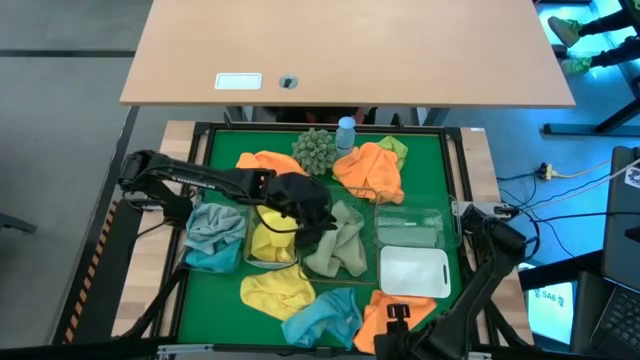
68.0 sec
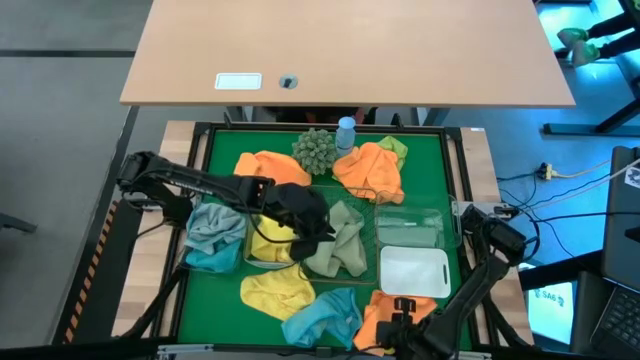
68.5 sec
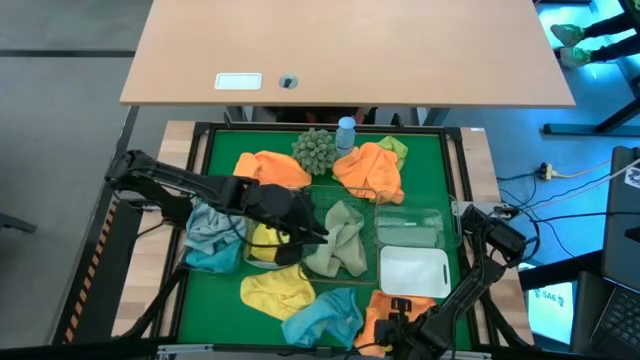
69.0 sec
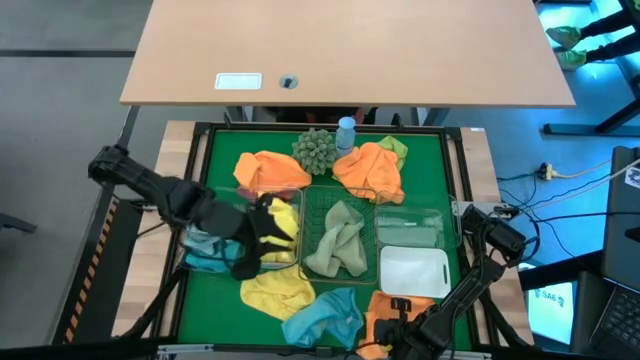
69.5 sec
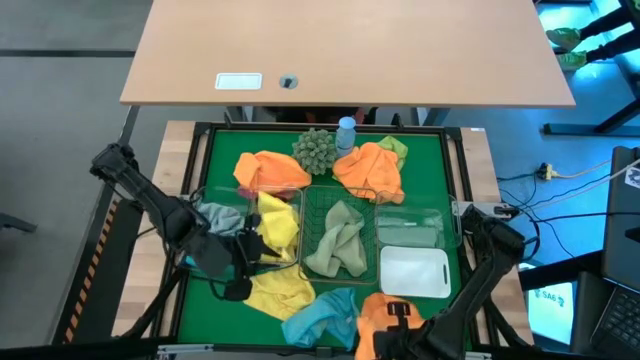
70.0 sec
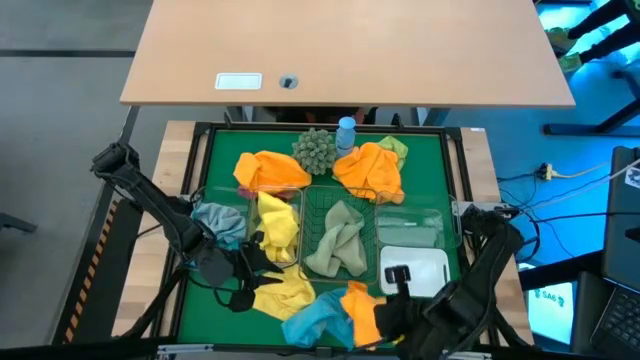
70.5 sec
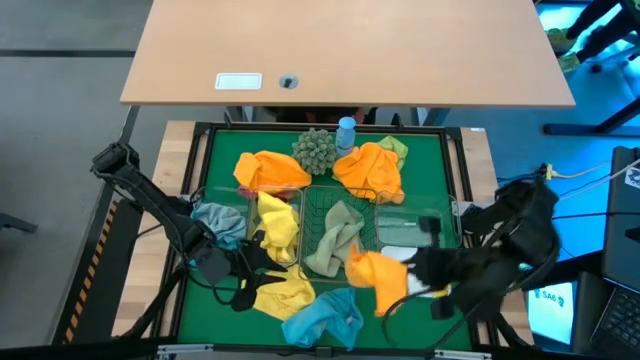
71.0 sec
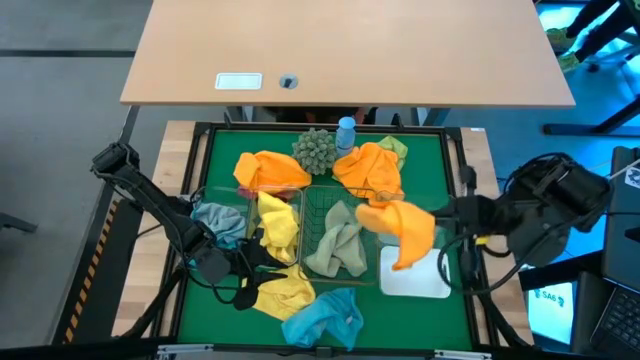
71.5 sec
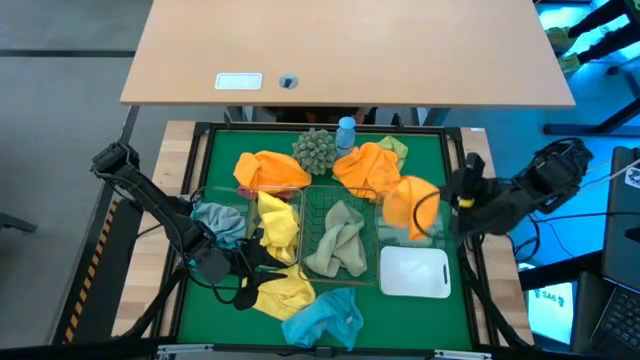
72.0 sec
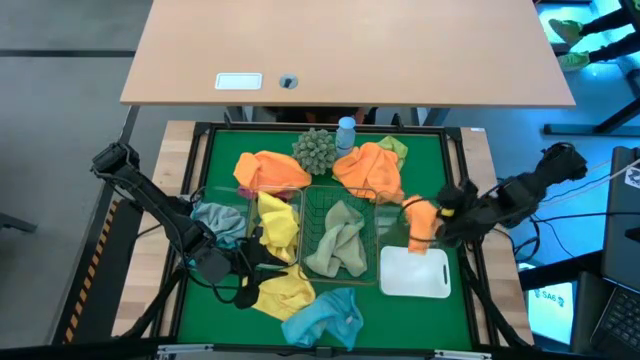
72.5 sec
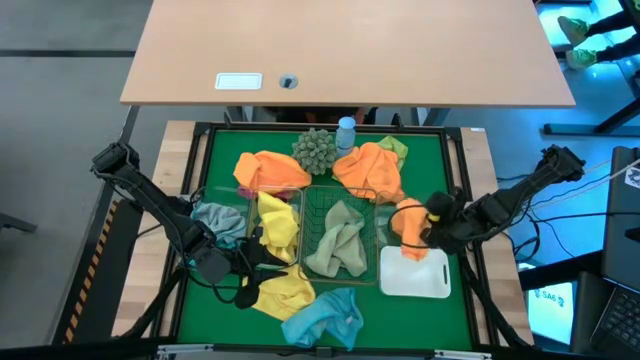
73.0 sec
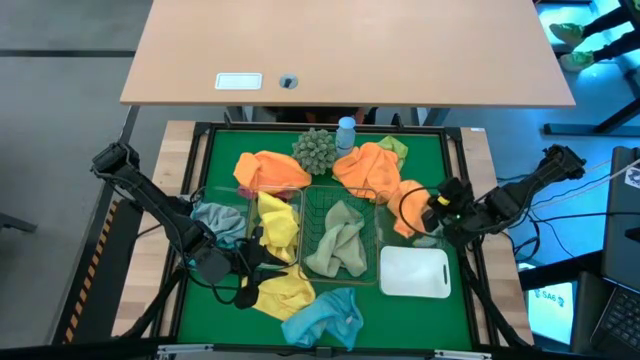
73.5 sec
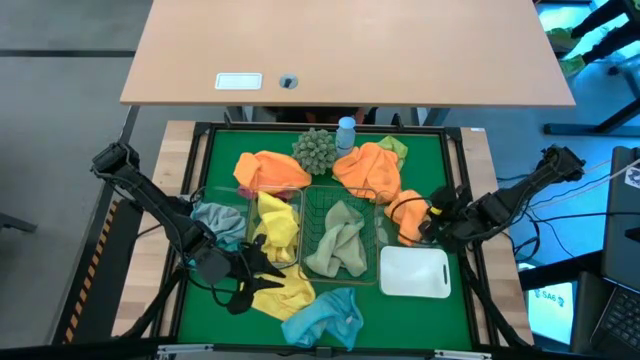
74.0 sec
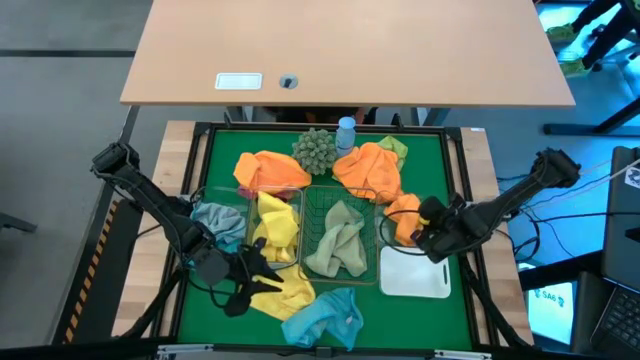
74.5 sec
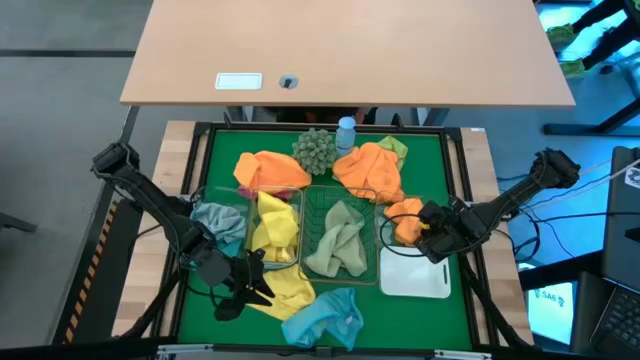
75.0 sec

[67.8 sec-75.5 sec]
Task: Sort microfiber towel by color & place in baskets
Put the bottom right orange microfiber cloth into the right transparent bin

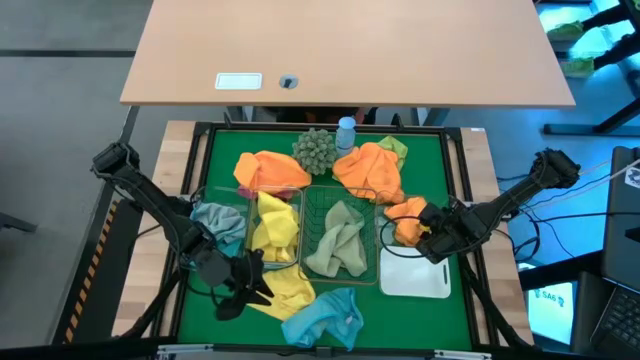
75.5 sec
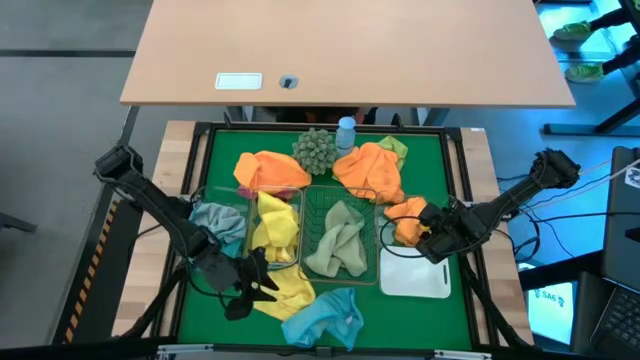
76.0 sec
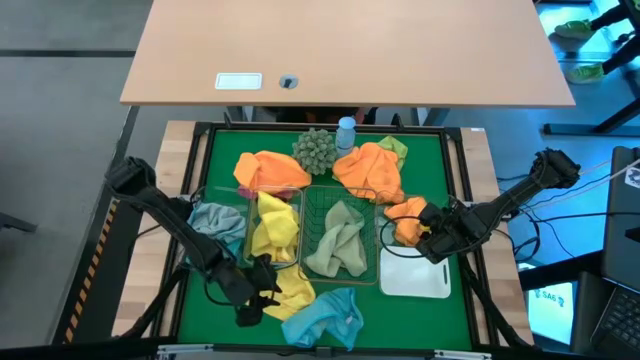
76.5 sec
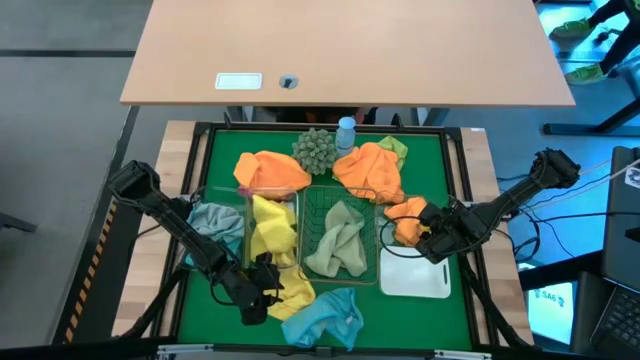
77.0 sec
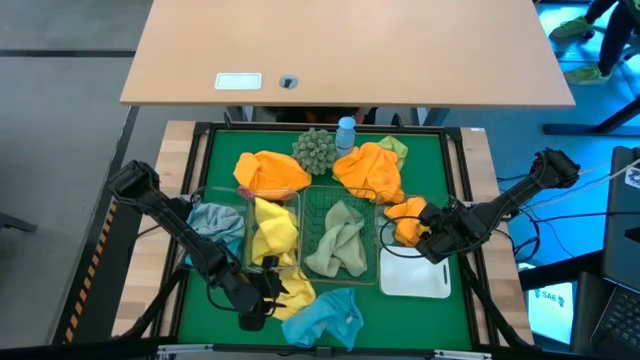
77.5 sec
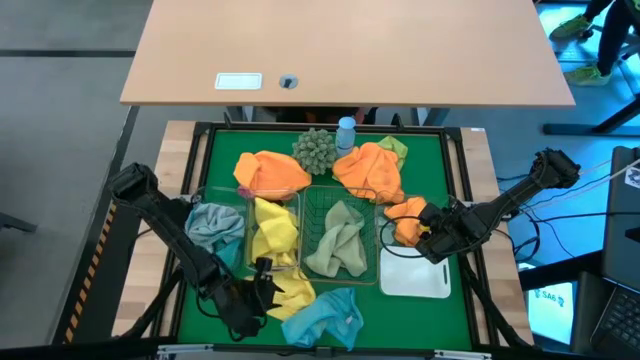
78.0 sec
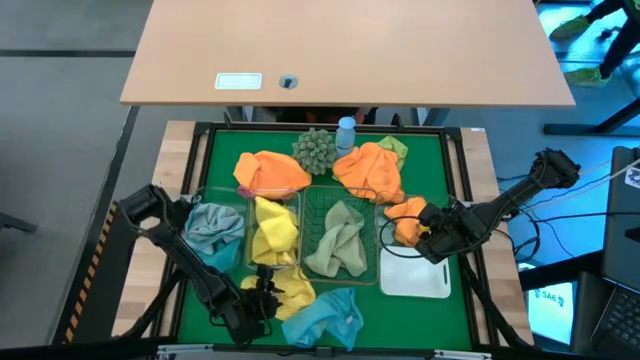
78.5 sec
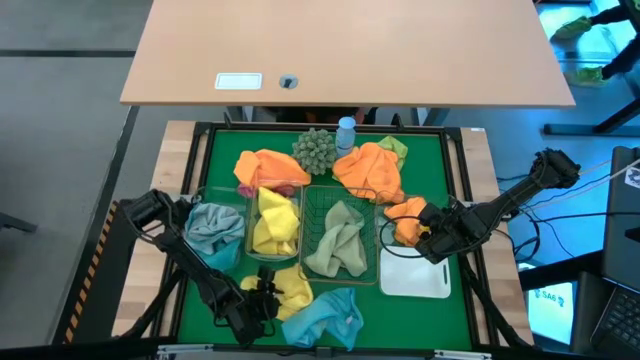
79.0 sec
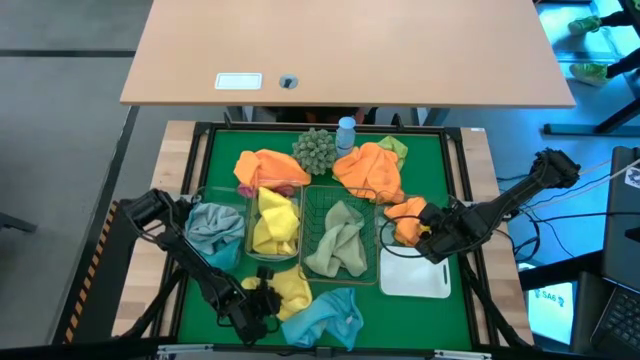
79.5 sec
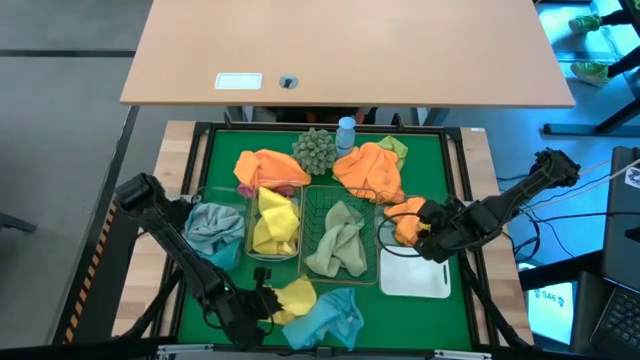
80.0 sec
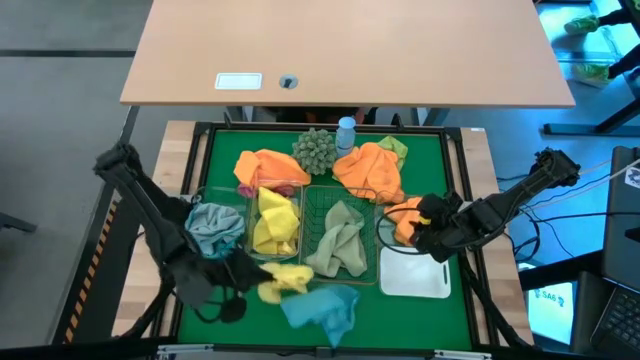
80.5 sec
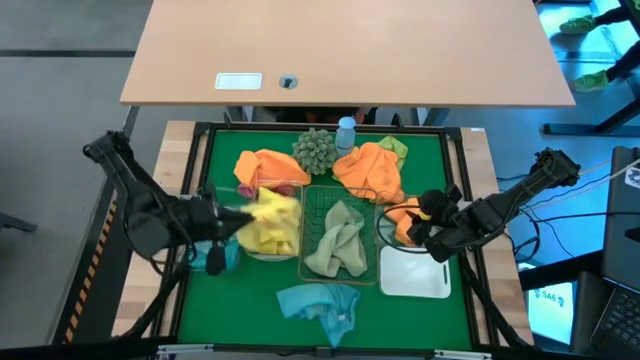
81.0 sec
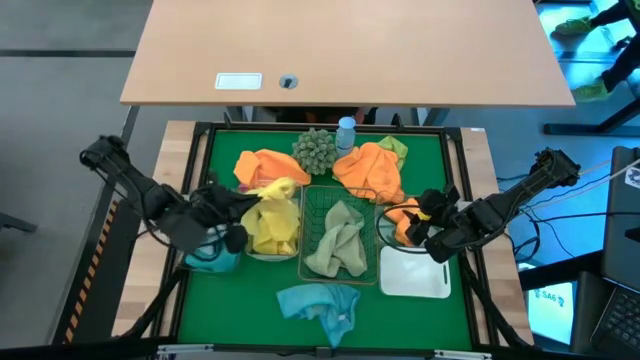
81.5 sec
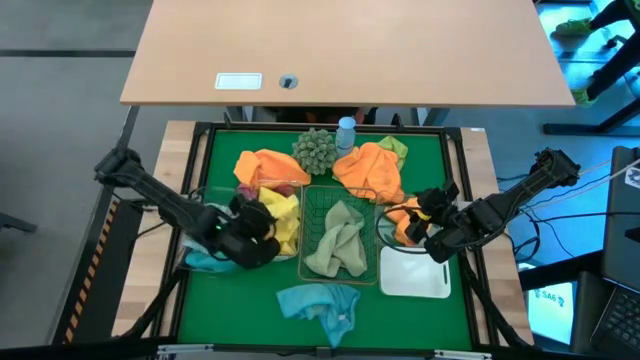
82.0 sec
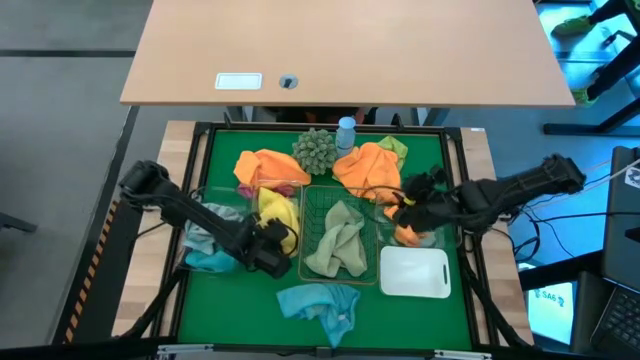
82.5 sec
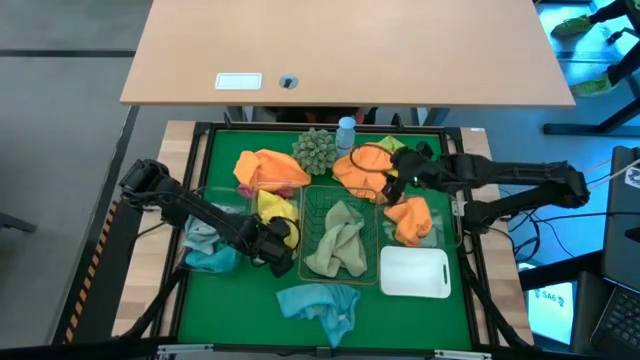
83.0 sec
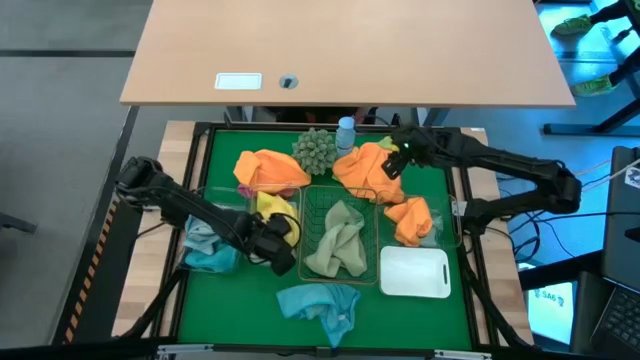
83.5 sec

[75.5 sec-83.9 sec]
Put the yellow microfiber cloth into the middle transparent bin

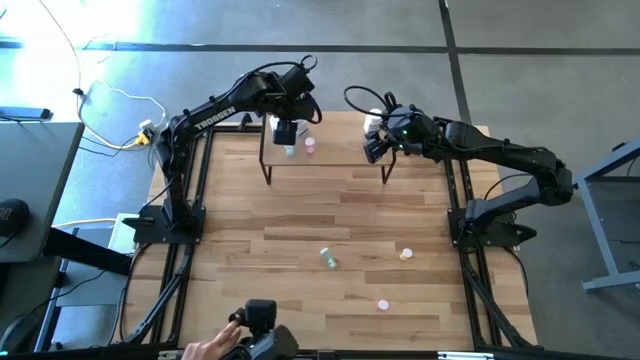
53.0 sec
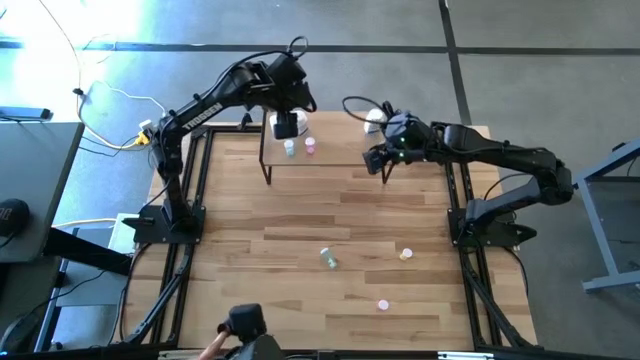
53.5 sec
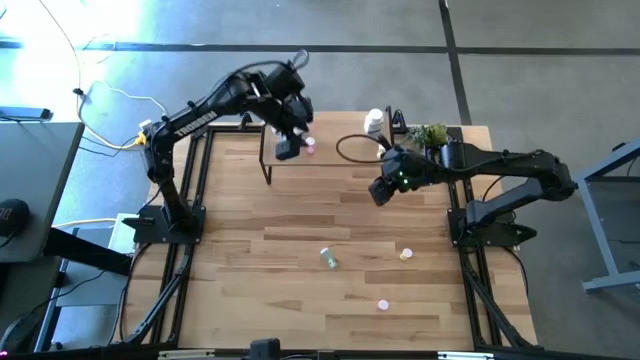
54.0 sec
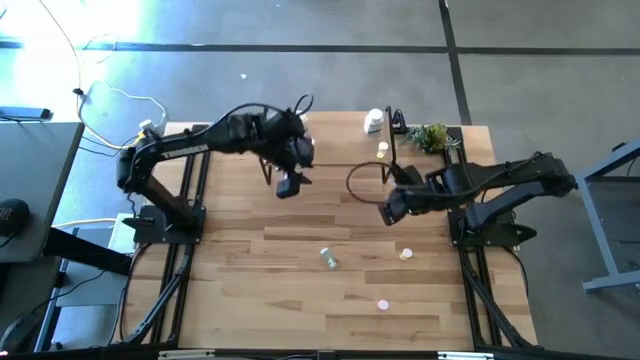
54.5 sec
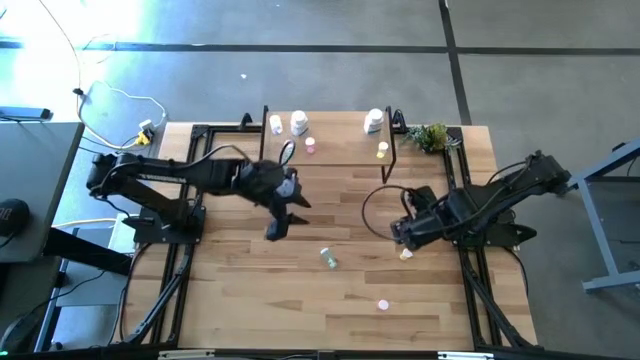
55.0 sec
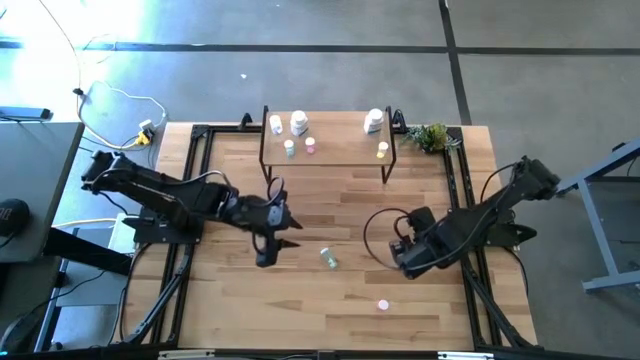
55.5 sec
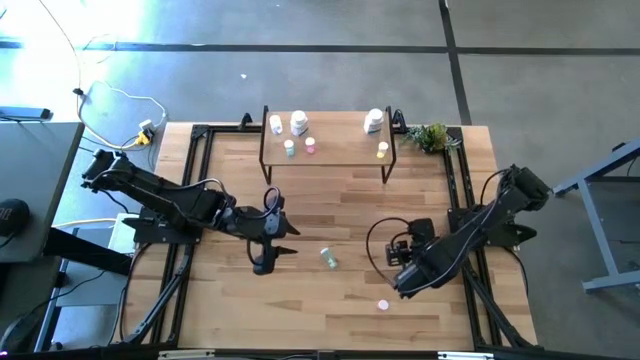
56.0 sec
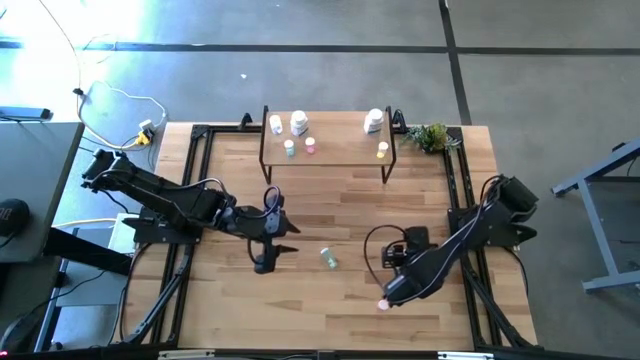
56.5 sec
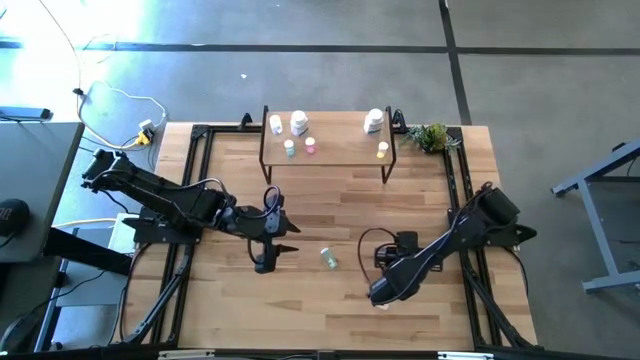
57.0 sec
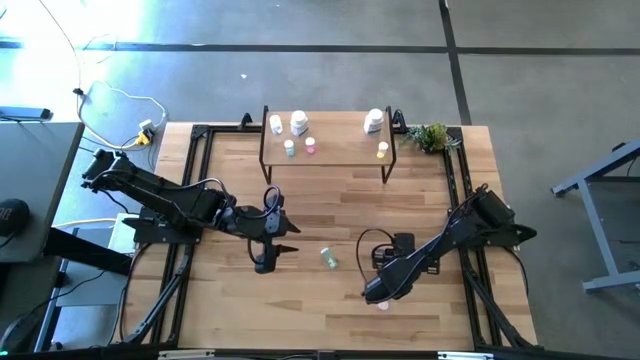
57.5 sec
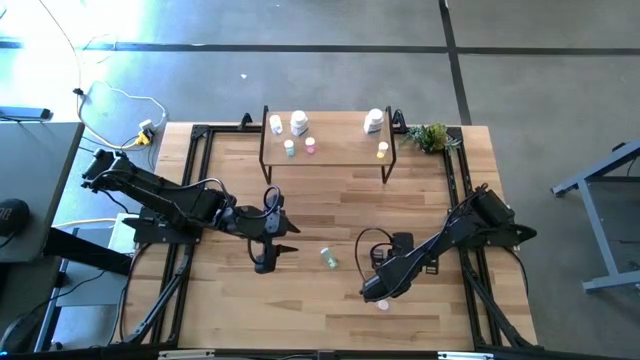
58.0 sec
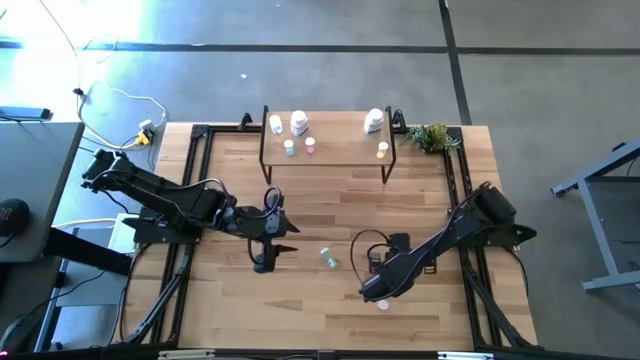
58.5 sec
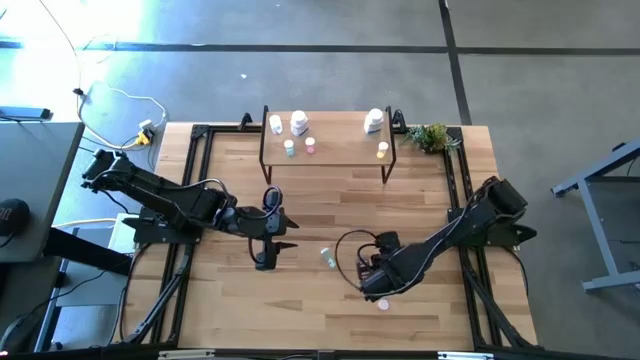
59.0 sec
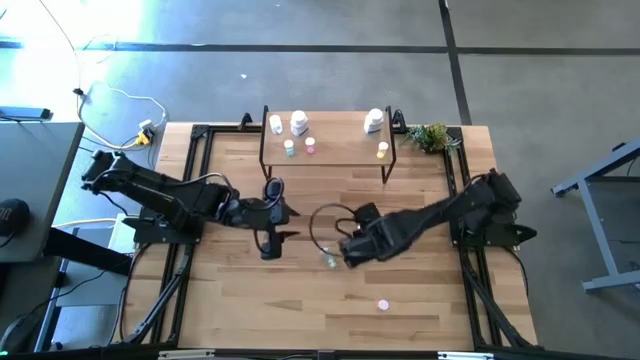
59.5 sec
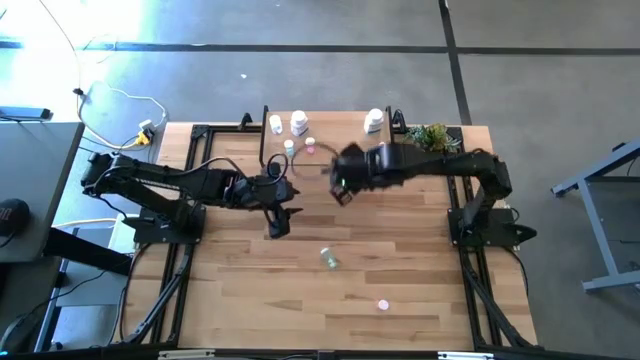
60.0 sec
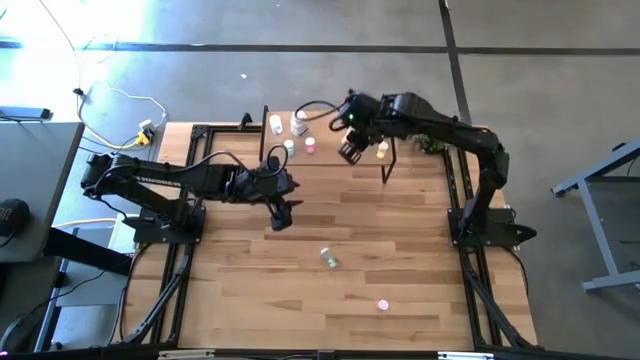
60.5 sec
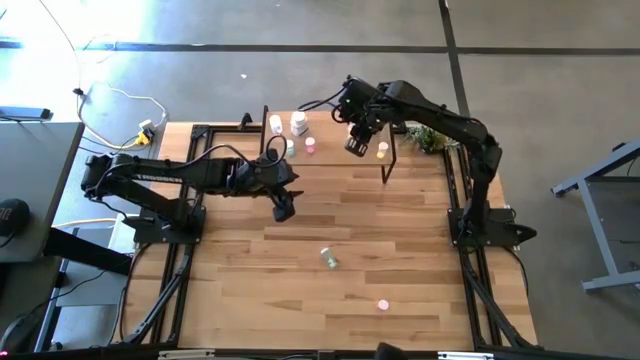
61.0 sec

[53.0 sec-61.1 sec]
Task: Pick and place medicine bottles onto shelf by color
Put the yellow medicine bottle on the shelf
